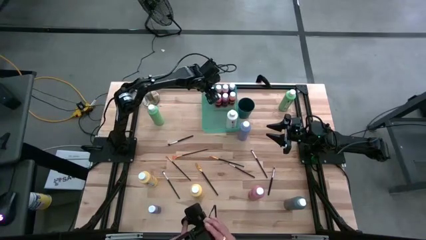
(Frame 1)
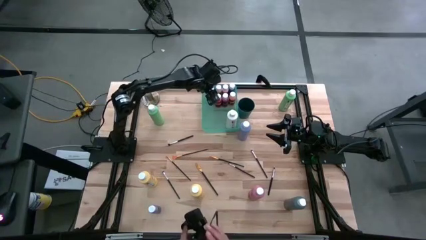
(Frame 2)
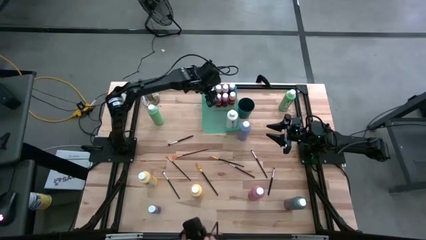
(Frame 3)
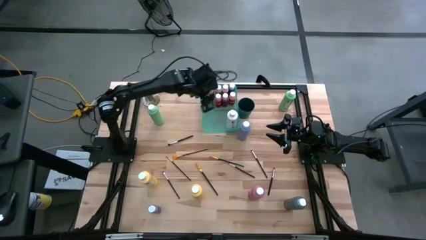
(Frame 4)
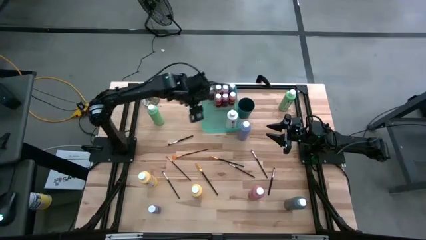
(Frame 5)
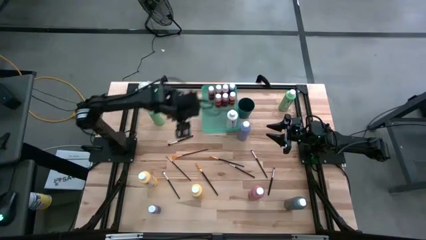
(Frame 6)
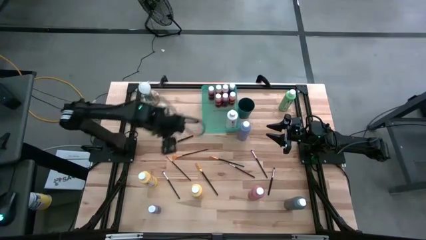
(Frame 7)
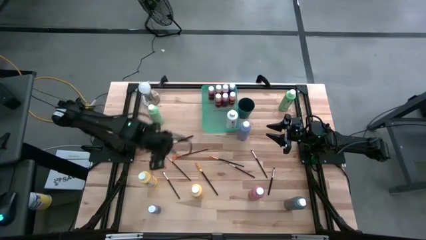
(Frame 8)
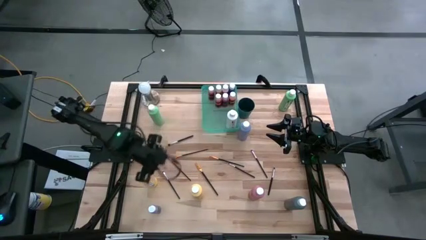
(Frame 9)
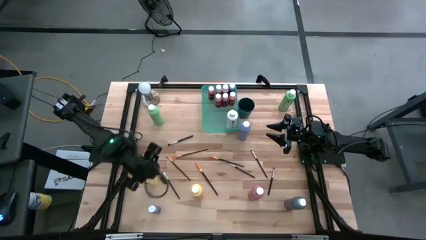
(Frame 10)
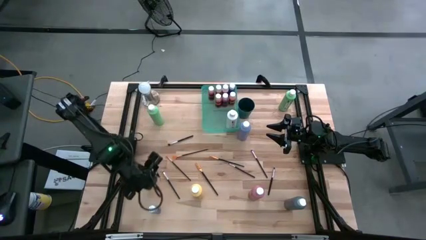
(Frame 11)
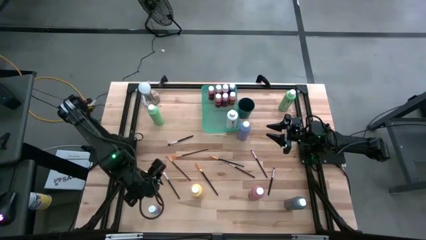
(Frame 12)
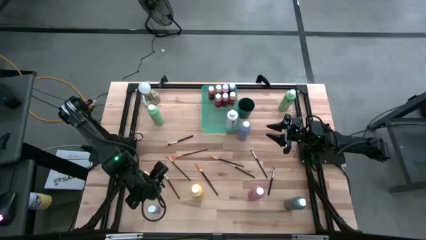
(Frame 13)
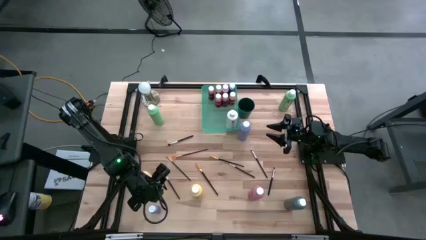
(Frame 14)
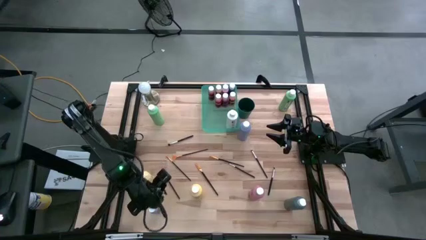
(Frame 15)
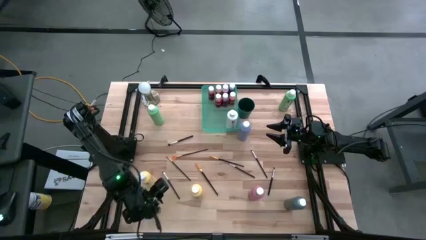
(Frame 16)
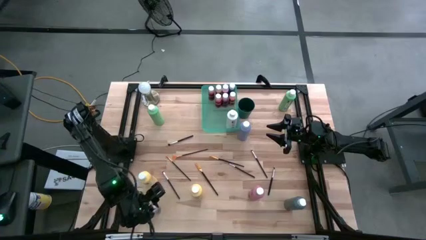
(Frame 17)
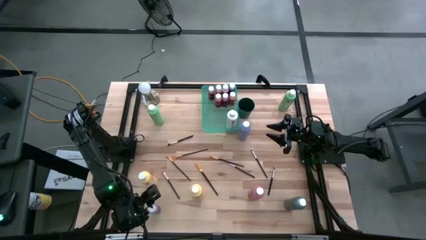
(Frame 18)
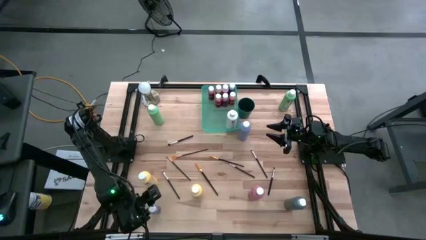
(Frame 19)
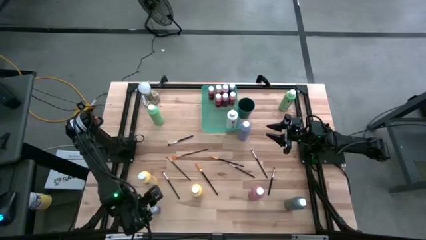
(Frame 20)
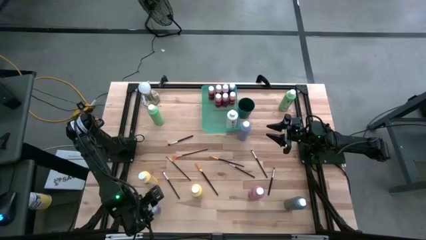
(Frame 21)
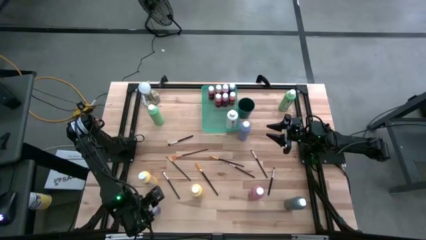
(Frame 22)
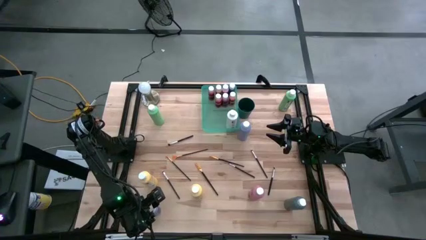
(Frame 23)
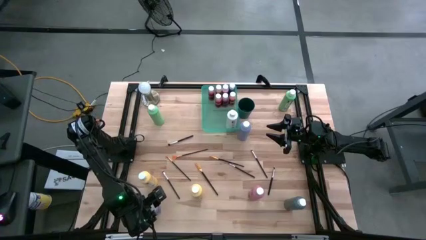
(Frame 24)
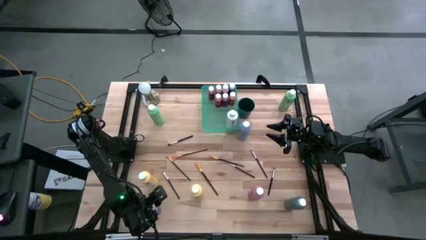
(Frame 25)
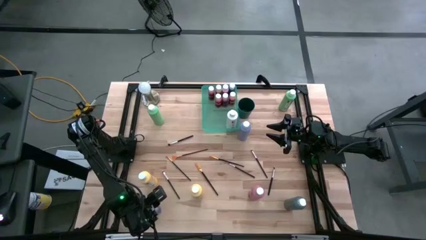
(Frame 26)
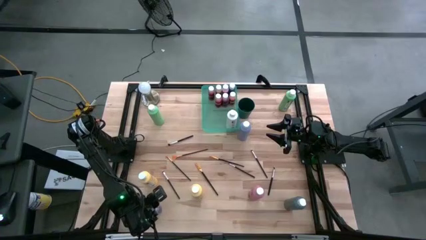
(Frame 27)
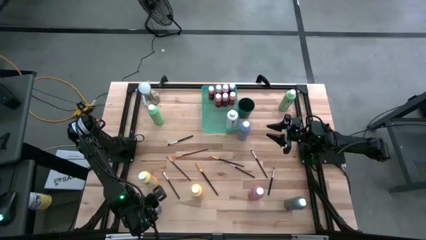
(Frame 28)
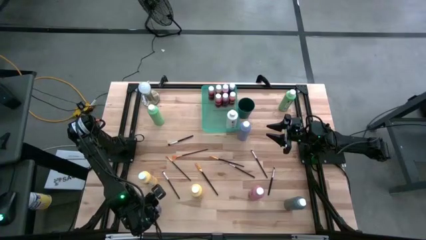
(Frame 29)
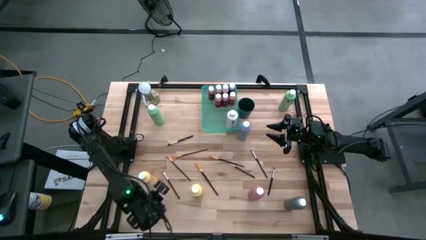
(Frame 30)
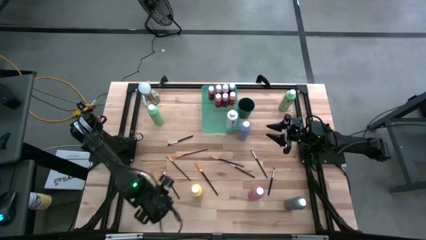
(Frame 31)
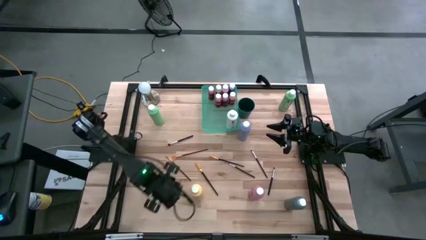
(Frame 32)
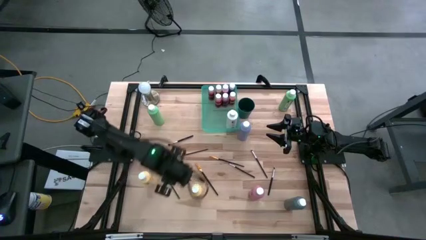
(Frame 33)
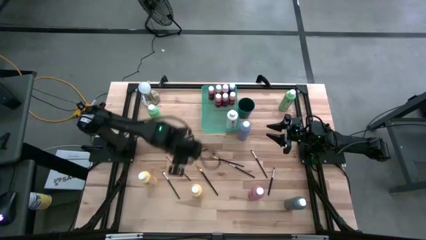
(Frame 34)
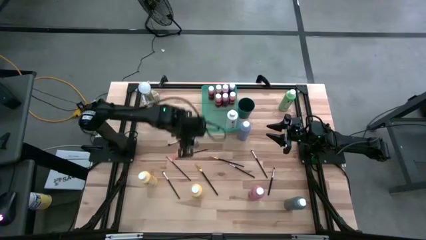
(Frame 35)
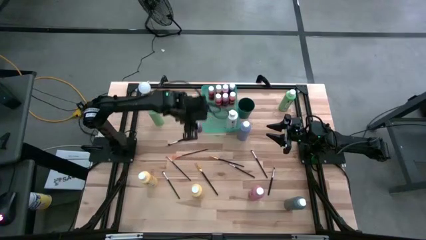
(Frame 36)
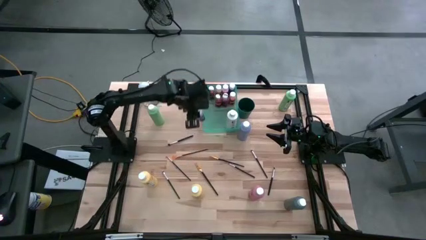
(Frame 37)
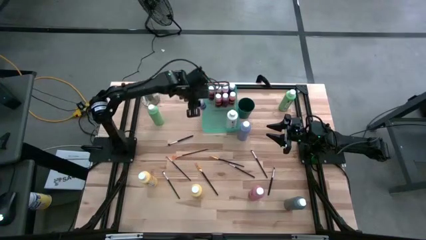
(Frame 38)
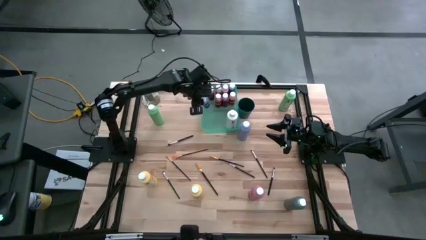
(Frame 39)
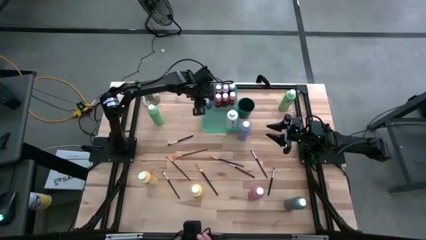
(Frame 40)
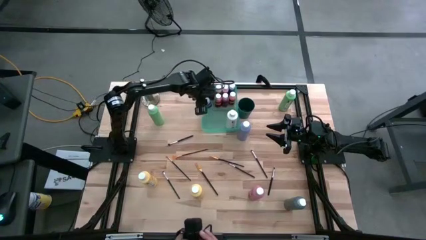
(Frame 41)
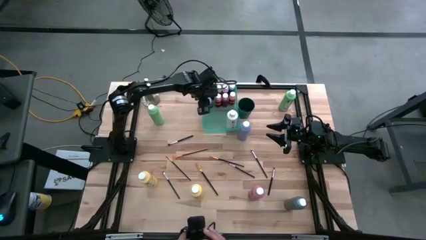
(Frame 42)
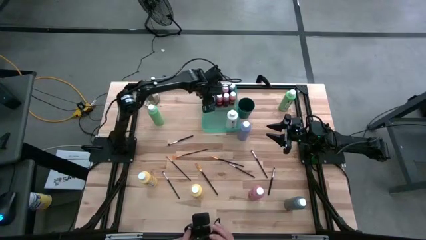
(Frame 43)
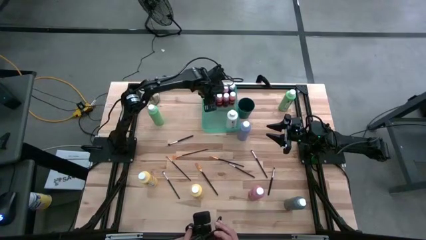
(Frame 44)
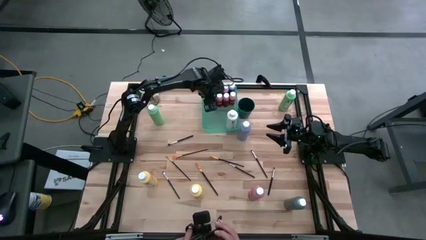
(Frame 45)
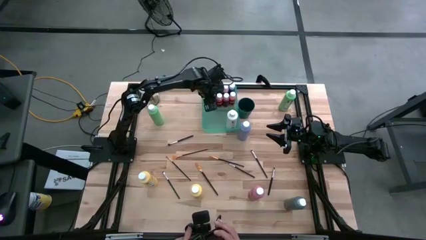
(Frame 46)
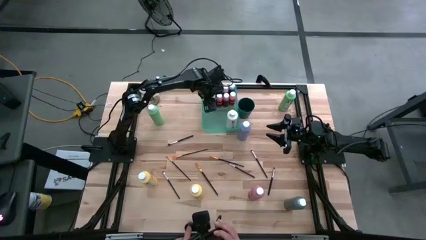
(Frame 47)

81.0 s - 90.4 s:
Task: Pick & Place Paint Supplies
Put the purple paint bottle into the green bin

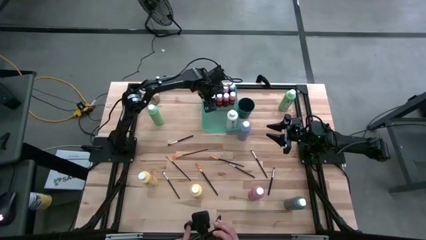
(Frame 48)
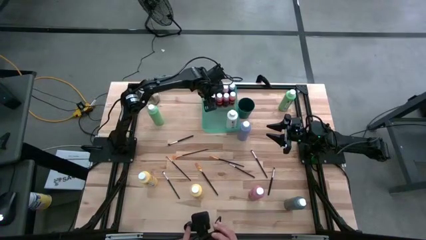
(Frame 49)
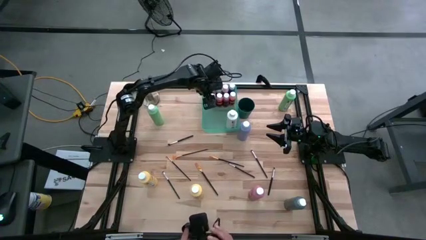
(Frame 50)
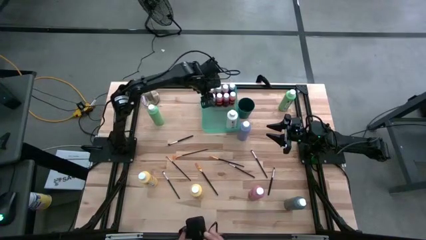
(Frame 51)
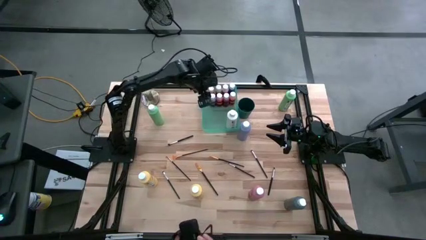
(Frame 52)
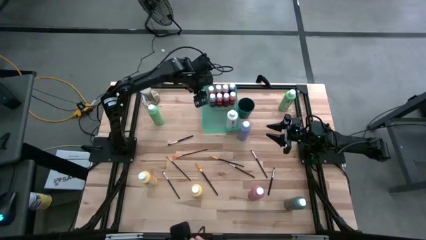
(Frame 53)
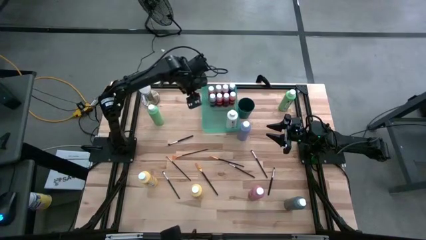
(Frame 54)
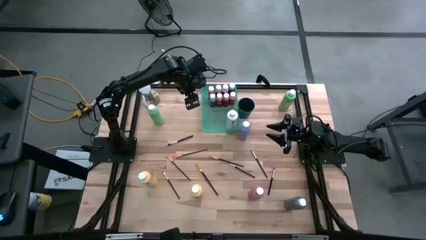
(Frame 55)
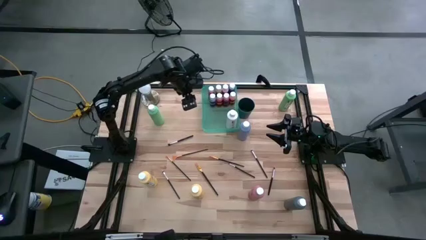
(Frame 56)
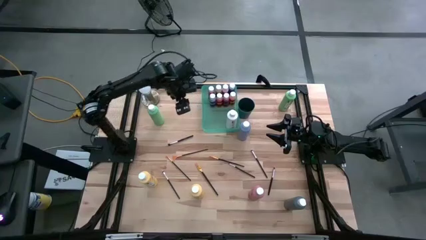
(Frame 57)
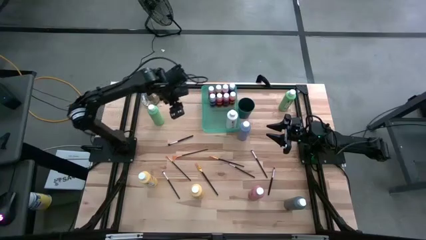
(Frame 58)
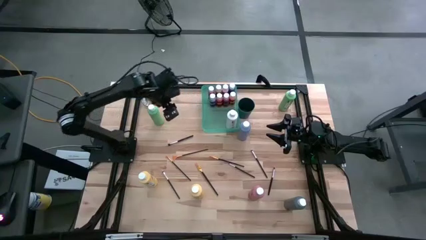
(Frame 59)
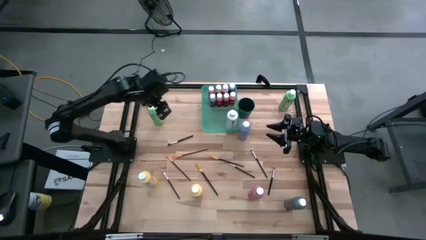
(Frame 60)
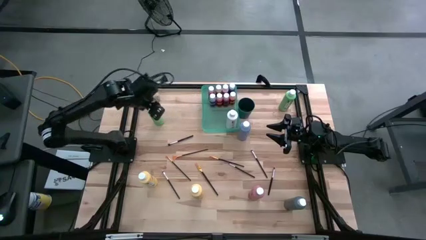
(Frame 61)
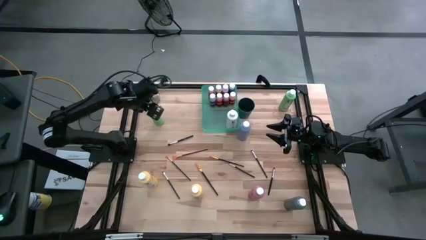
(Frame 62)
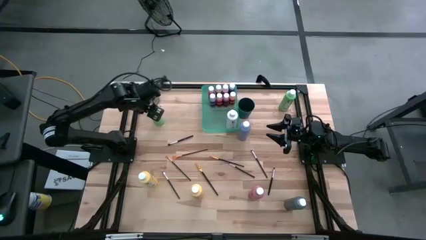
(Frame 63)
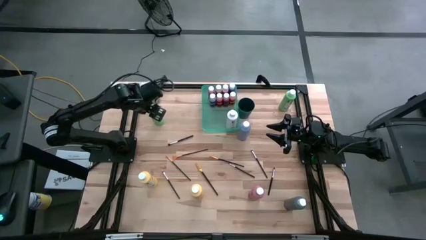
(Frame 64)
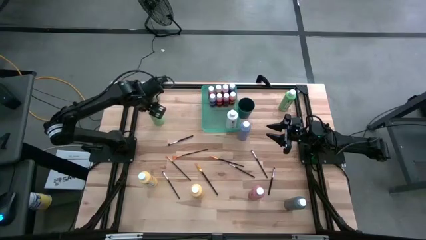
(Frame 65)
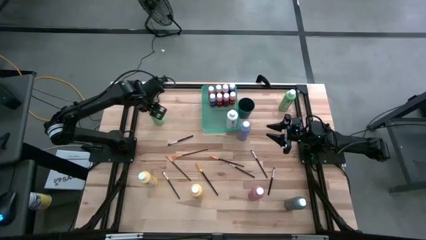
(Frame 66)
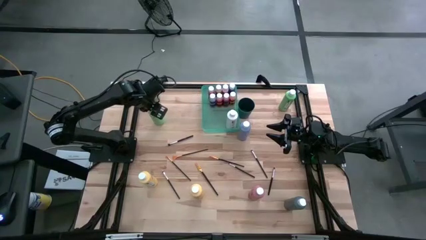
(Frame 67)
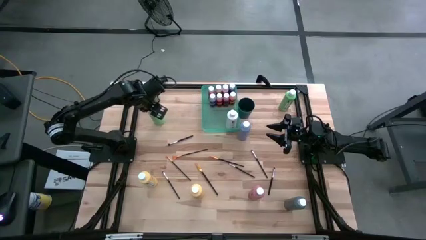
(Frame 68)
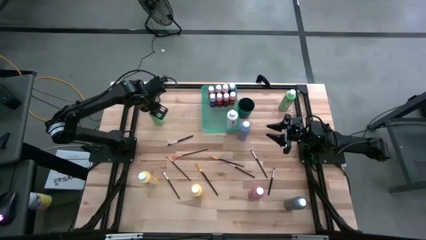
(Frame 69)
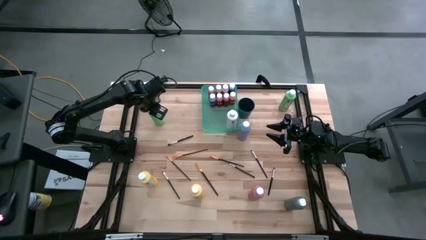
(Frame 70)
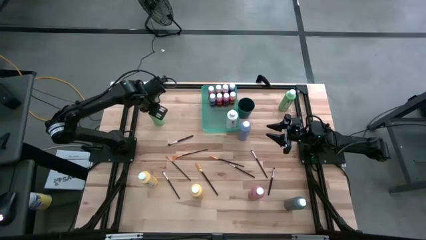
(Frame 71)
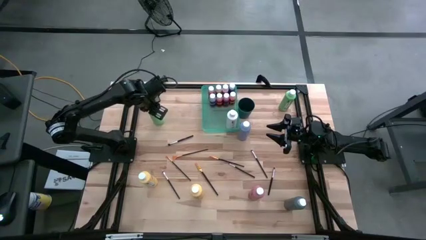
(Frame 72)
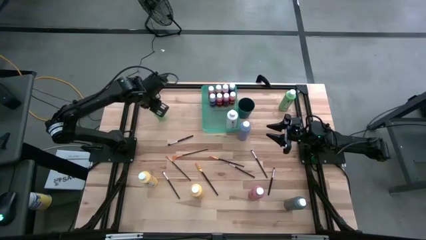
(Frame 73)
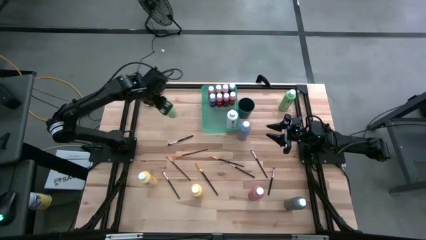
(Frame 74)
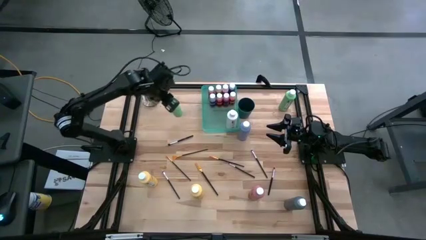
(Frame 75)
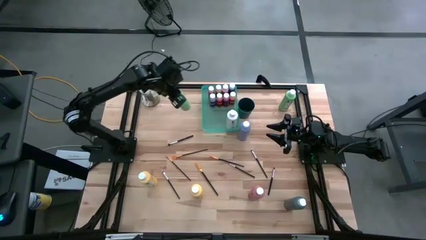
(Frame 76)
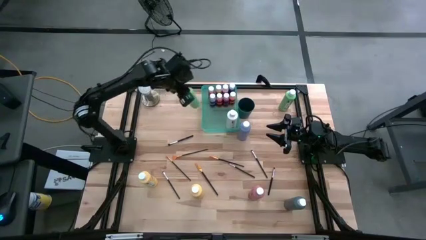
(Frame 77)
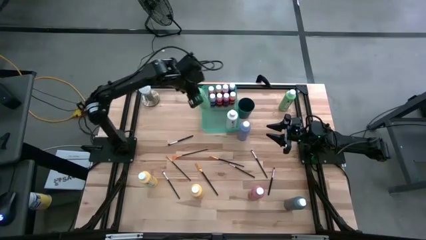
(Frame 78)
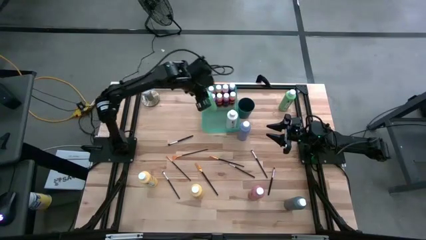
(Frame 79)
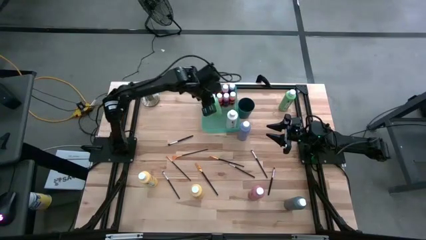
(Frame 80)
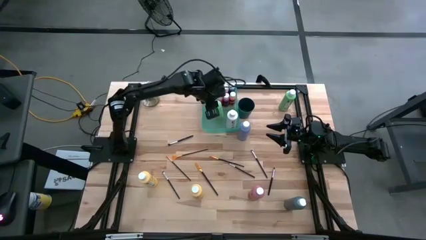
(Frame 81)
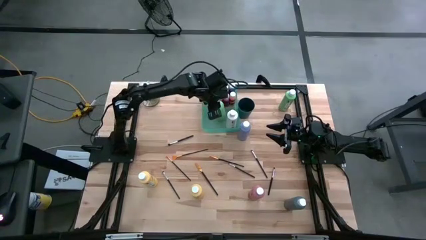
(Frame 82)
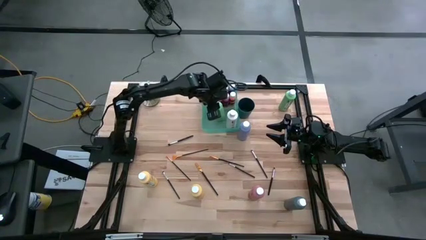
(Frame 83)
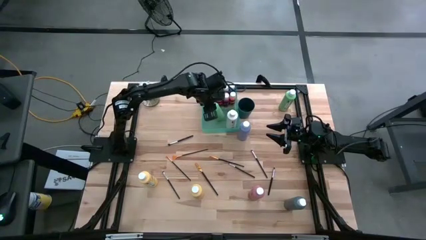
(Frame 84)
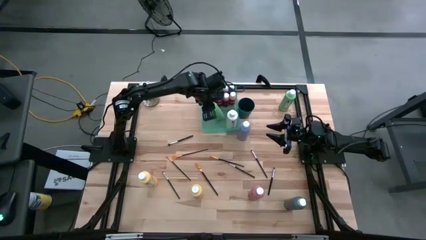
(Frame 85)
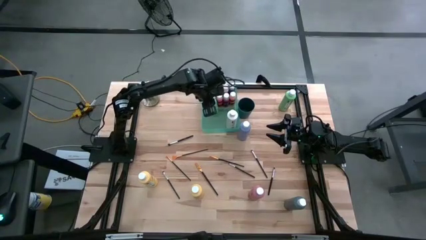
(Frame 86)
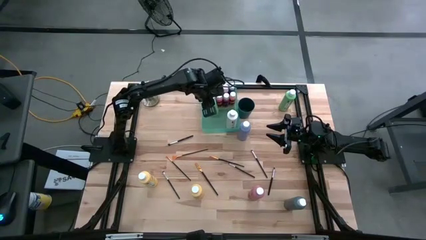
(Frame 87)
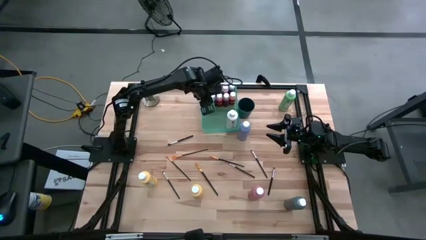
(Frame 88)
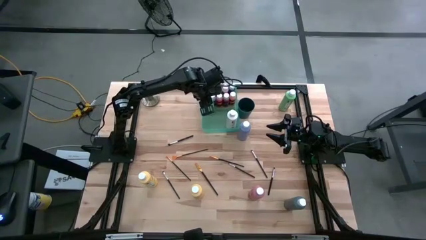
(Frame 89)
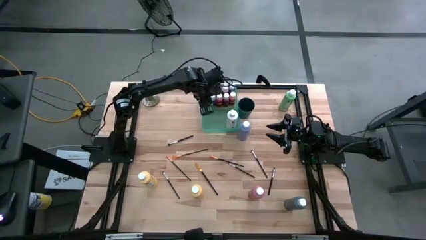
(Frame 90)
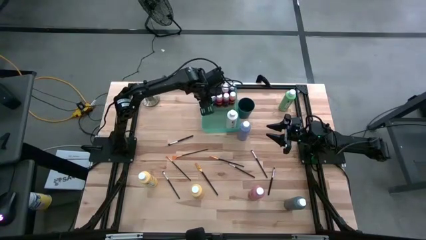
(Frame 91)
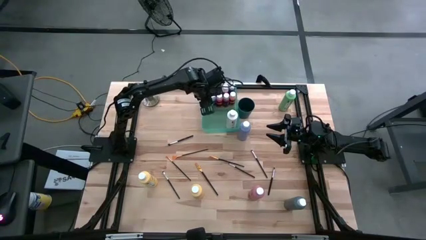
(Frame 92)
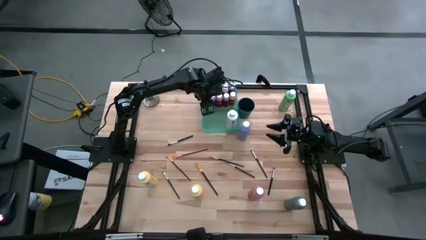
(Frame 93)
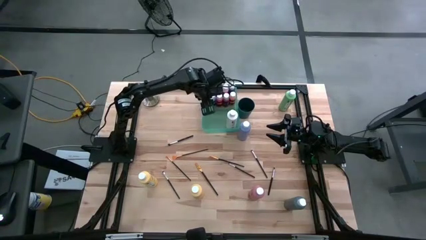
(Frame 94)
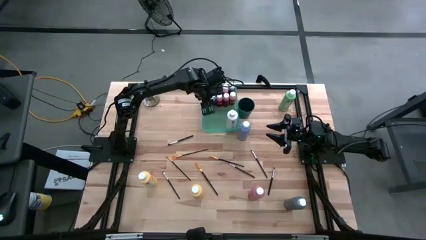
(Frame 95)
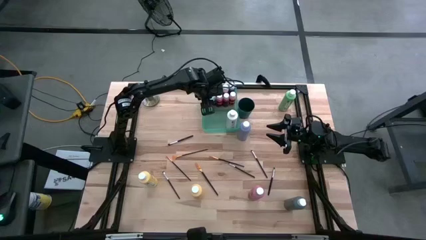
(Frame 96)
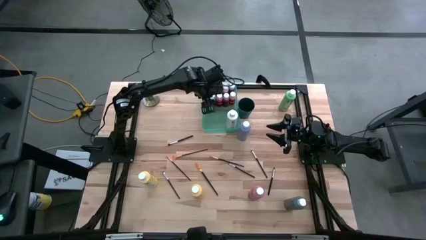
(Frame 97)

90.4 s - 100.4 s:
Put the left light green paint bottle into the green bin
